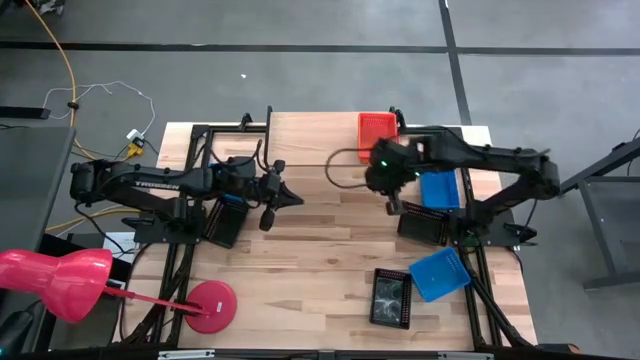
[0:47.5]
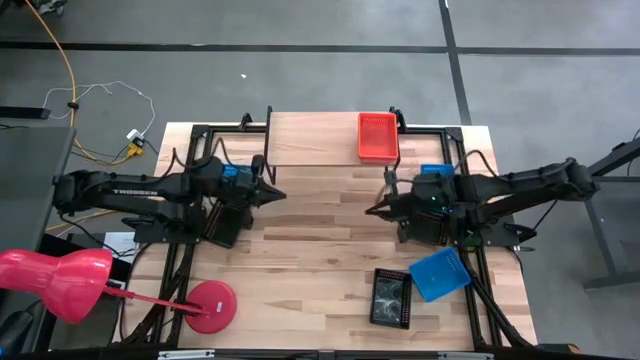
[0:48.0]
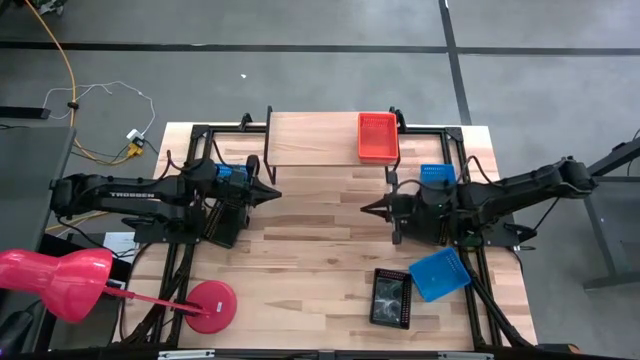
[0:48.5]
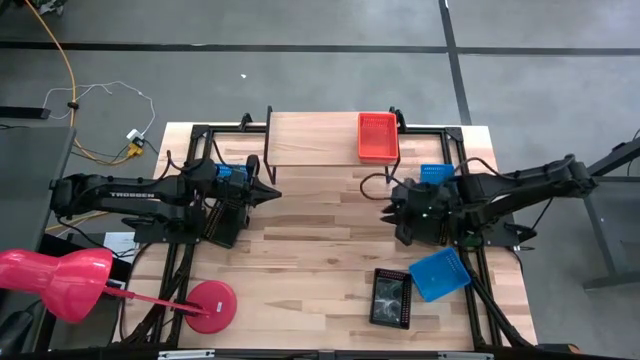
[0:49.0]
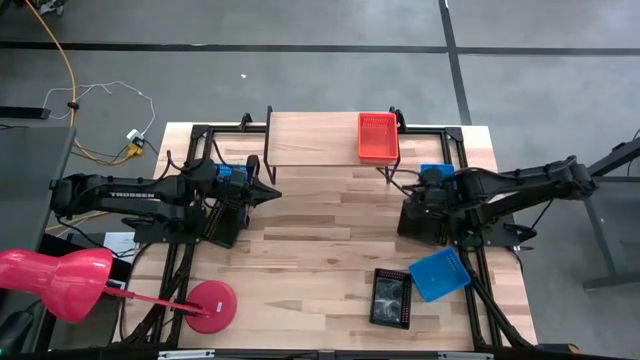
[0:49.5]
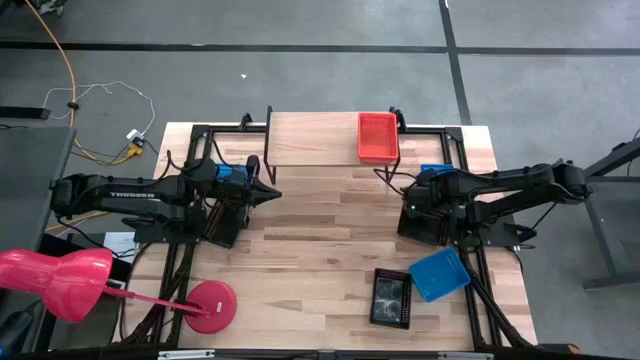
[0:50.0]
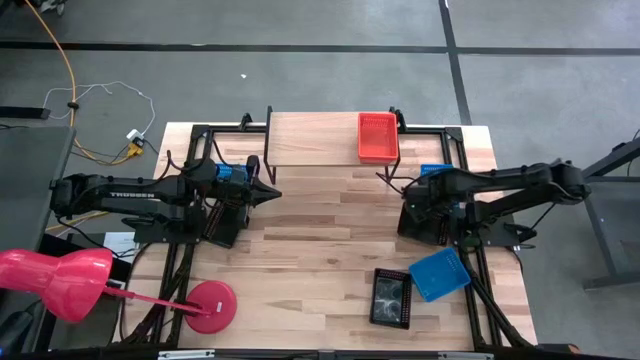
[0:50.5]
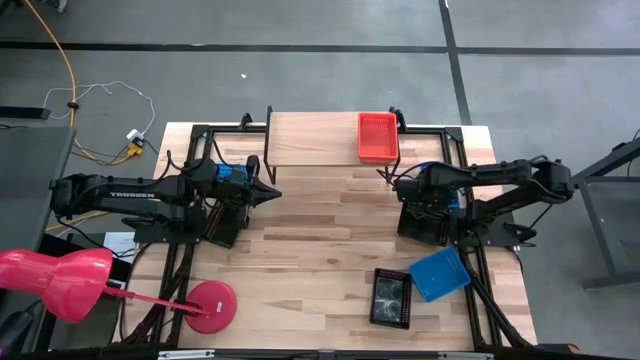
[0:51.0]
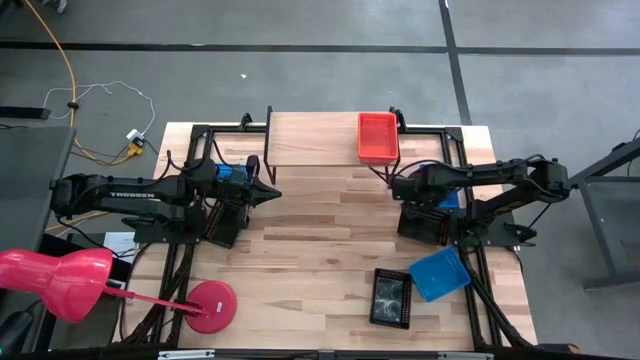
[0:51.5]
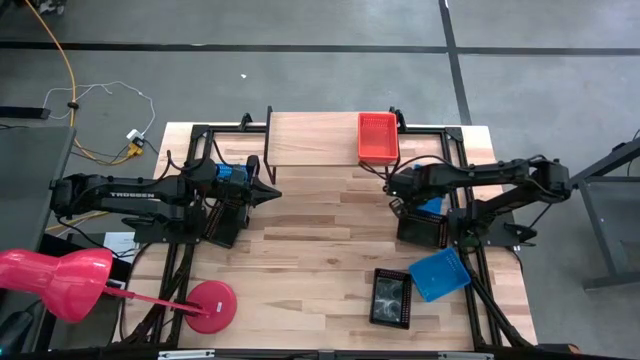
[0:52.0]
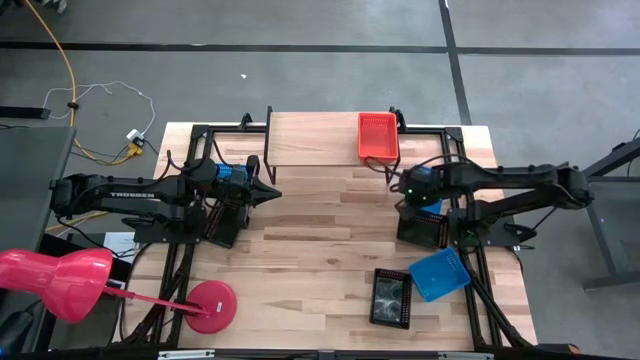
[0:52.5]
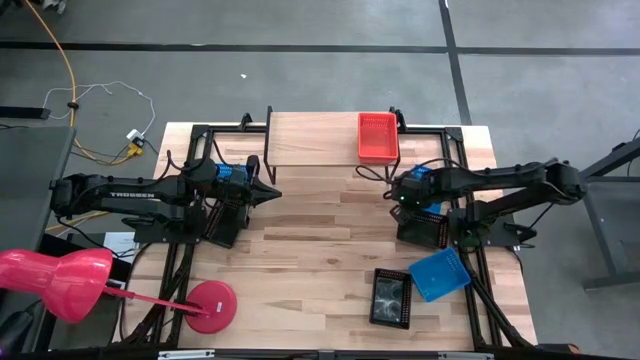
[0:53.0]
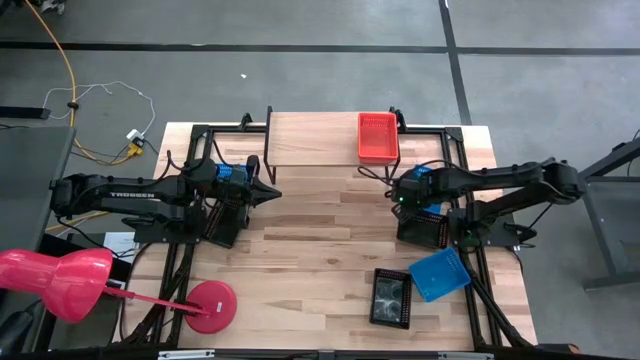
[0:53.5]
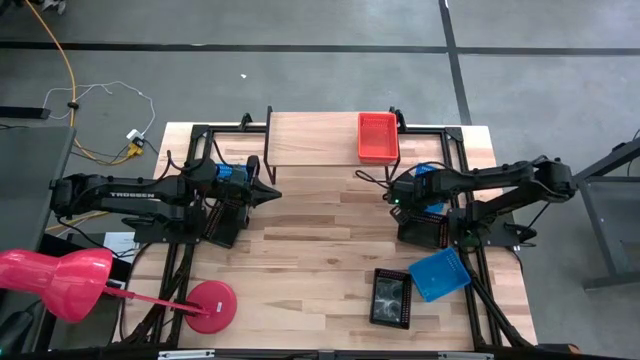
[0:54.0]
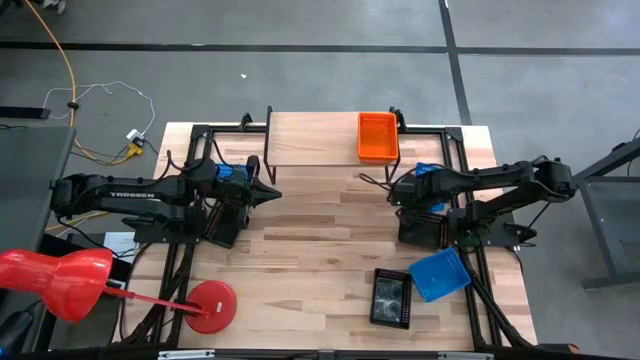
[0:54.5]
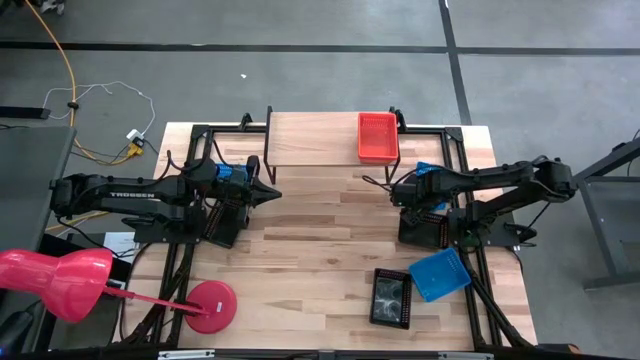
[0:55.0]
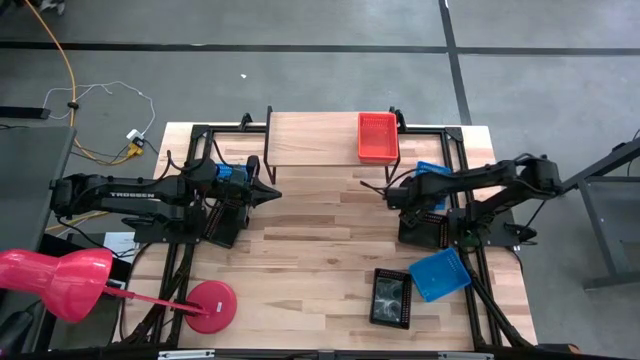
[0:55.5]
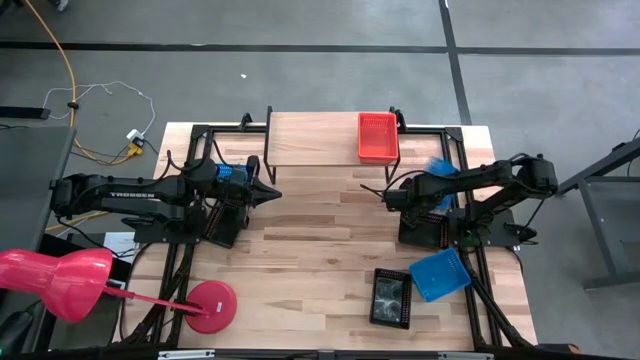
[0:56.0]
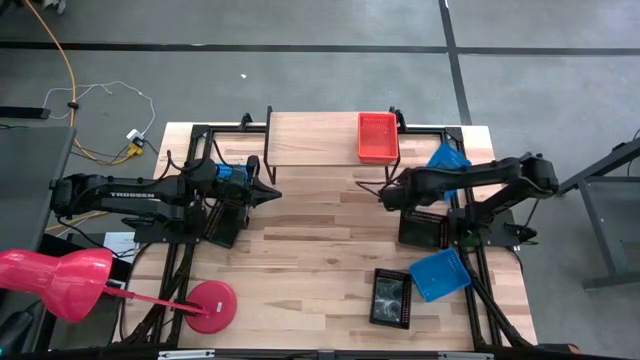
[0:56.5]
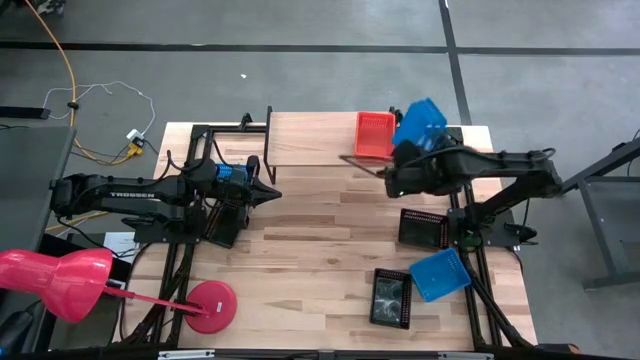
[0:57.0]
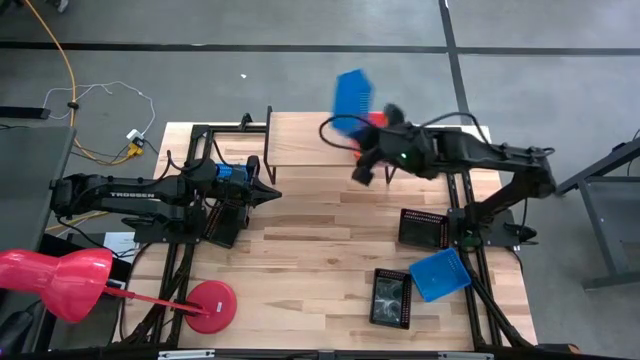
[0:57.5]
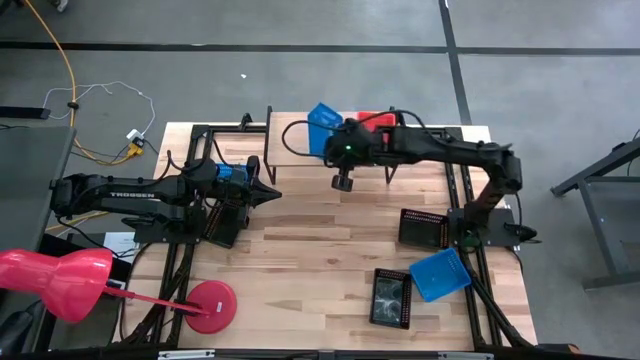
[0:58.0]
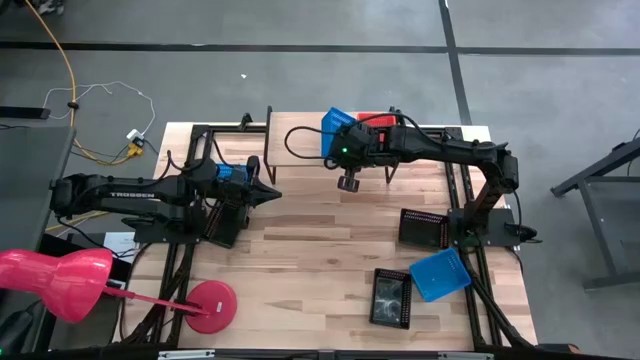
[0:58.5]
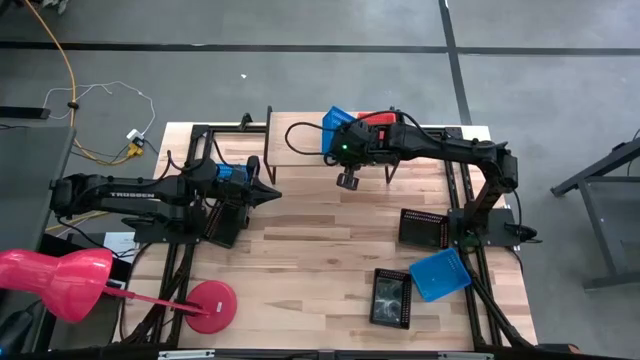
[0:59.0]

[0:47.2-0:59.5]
Task: Stack baskets on shelf by color
Put the top right blue basket on the shelf

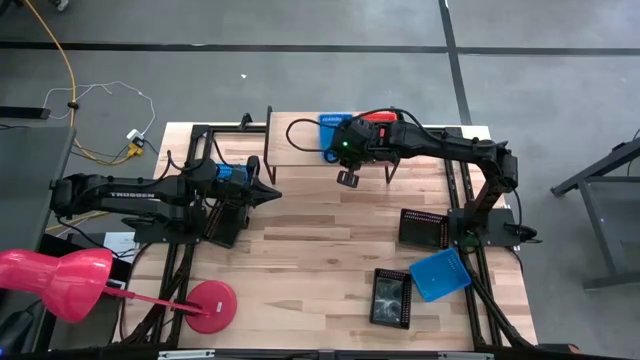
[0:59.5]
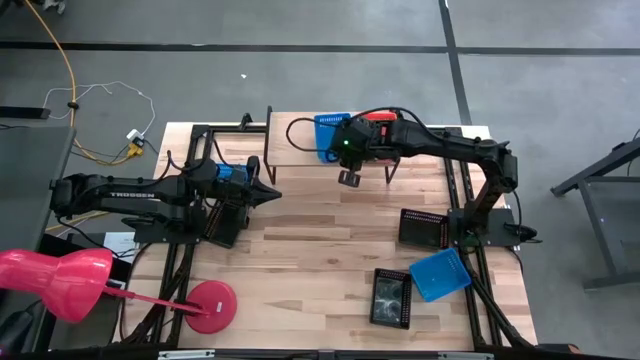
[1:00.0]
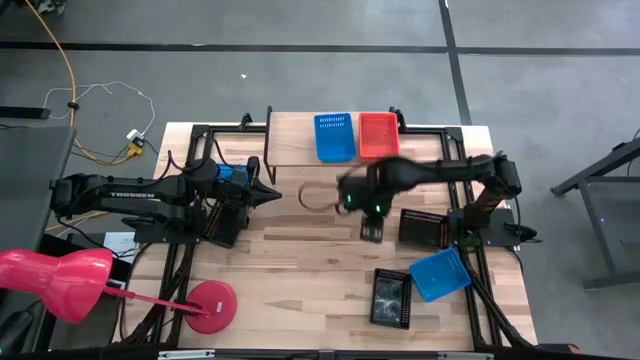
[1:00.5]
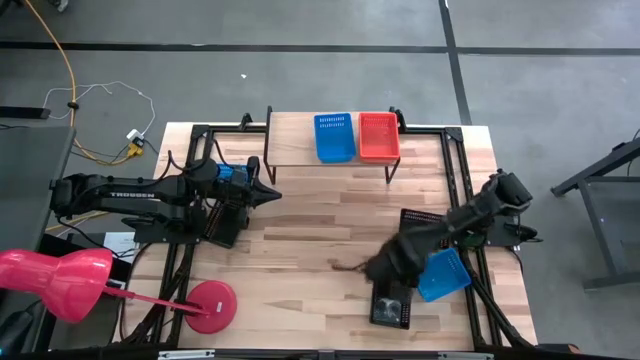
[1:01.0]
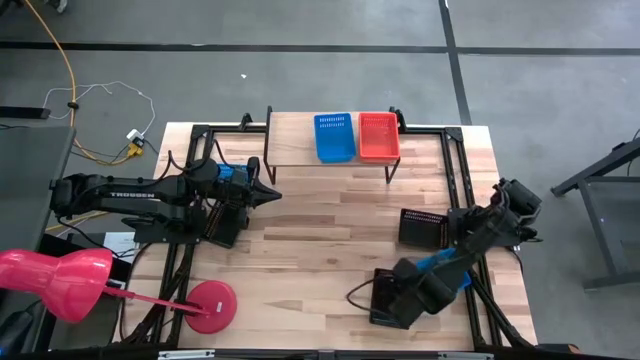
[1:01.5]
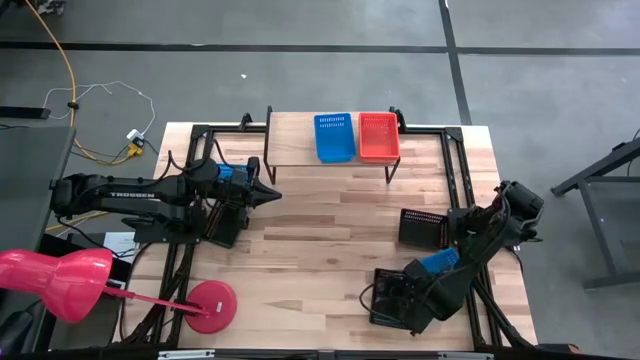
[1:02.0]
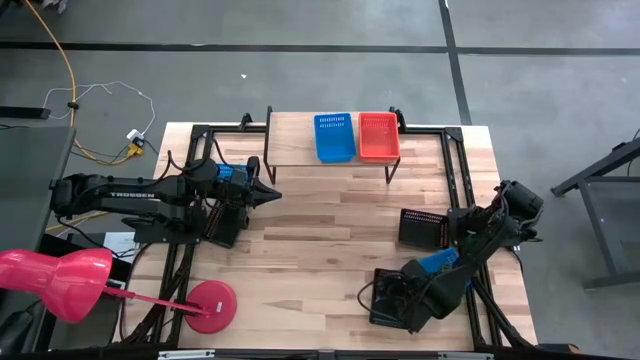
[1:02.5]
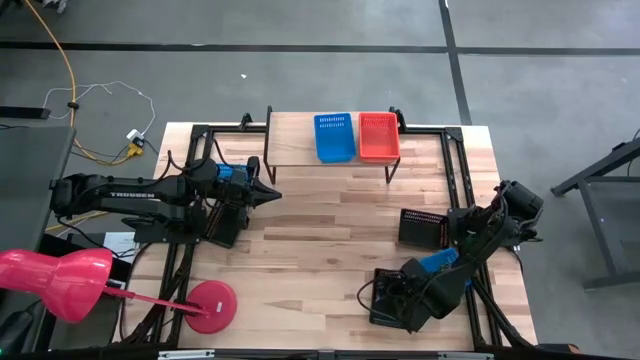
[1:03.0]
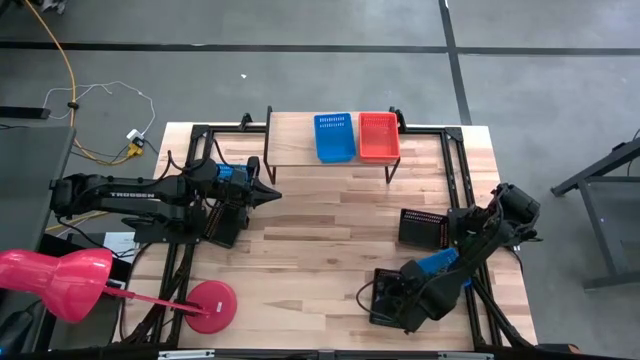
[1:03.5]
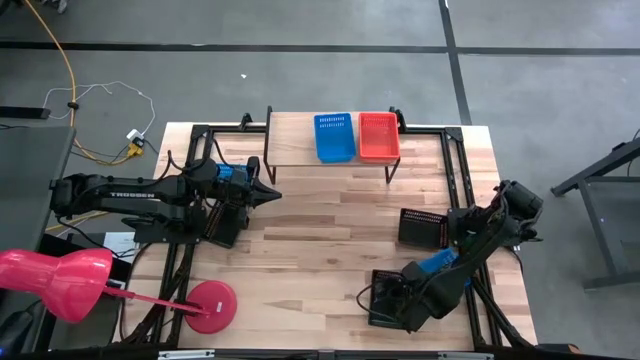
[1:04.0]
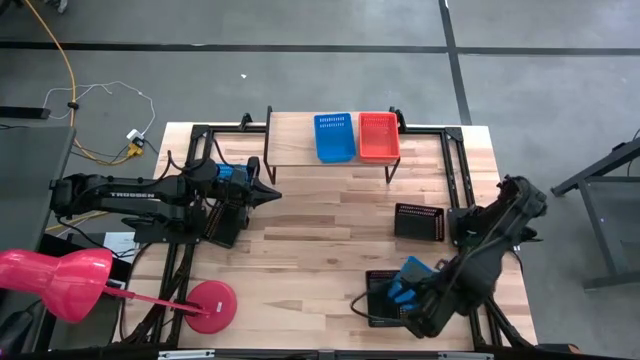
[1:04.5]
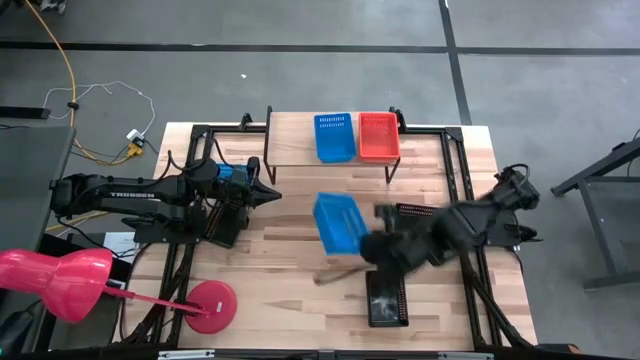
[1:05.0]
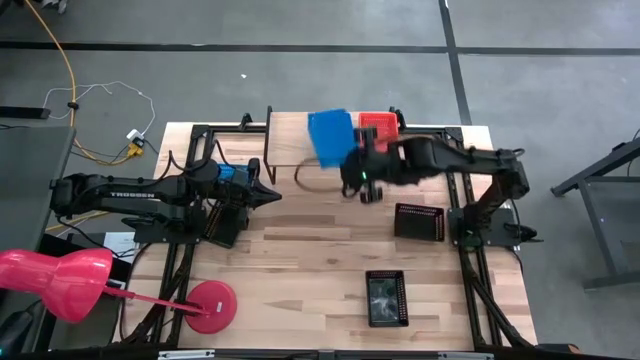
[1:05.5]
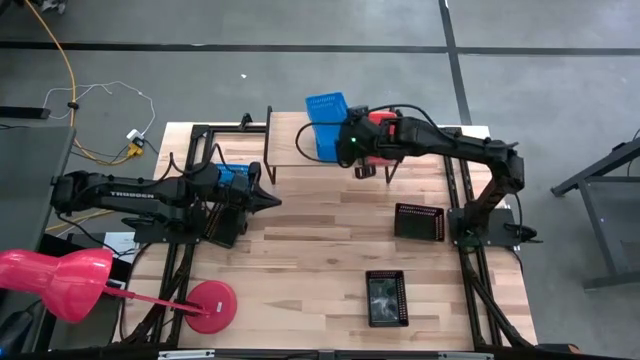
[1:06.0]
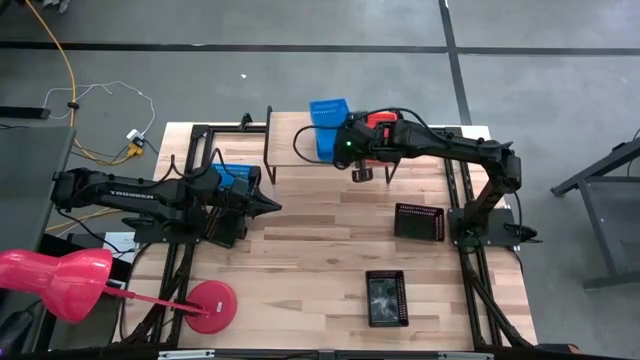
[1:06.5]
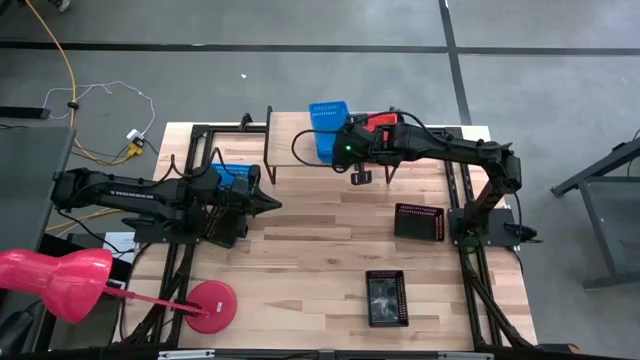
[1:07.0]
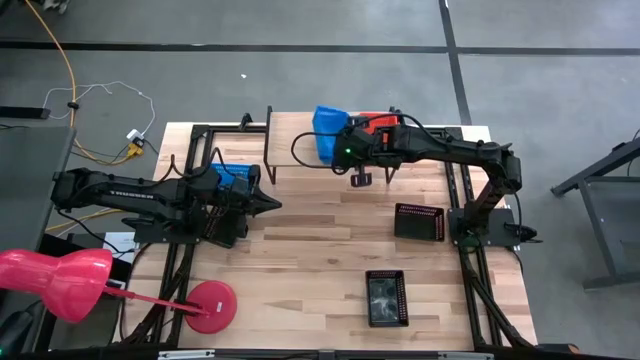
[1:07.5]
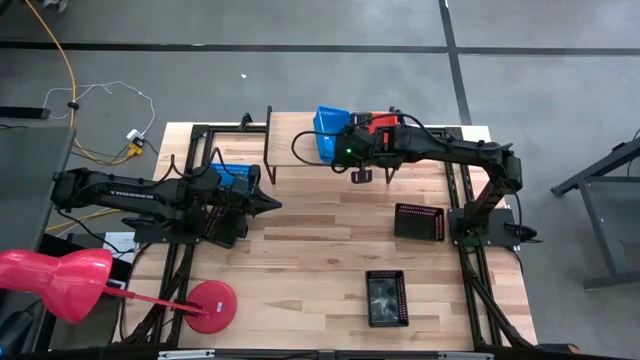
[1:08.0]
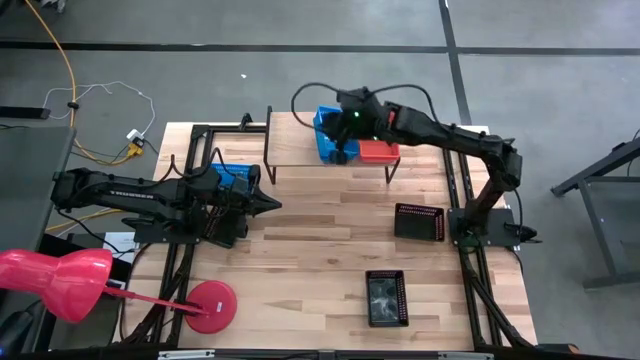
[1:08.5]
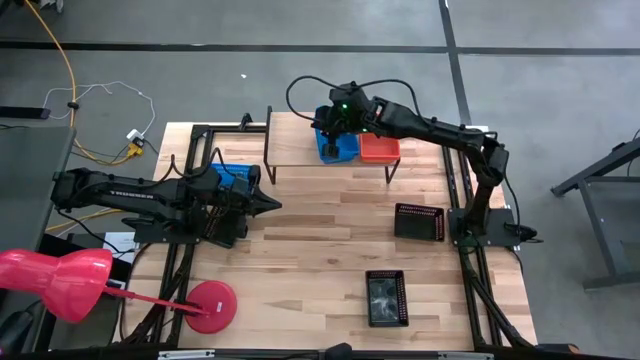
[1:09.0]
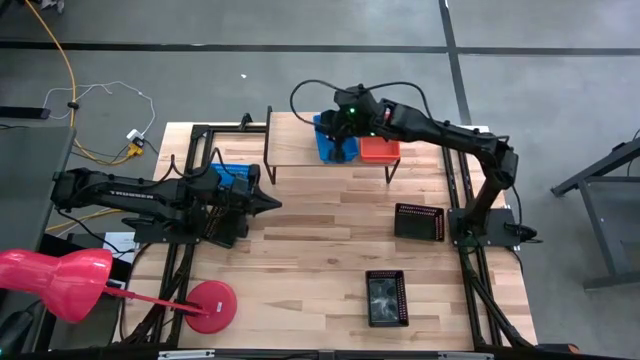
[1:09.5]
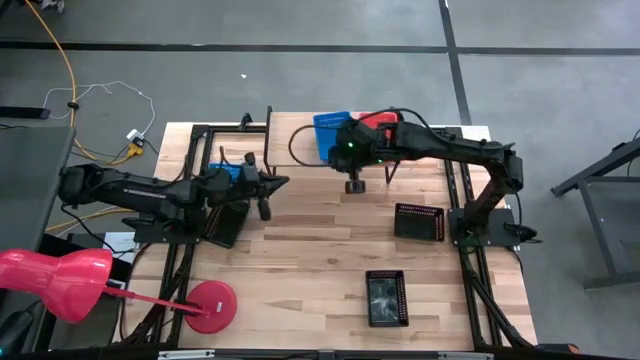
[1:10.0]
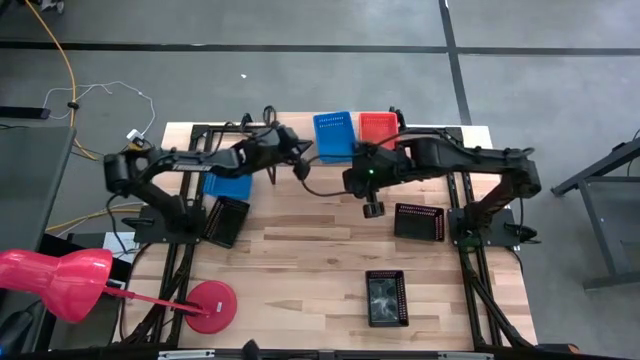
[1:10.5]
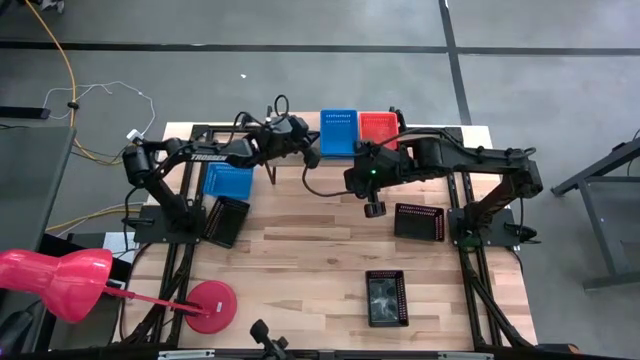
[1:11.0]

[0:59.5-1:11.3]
Stack the bottom right blue basket on the other blue basket on the shelf
